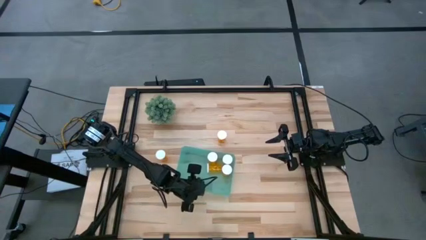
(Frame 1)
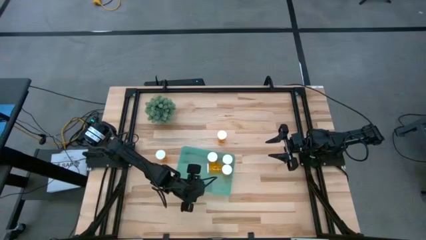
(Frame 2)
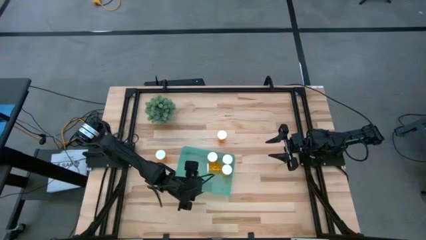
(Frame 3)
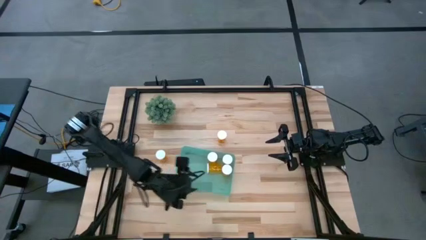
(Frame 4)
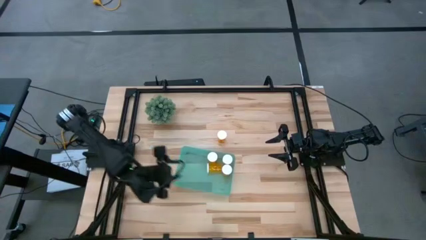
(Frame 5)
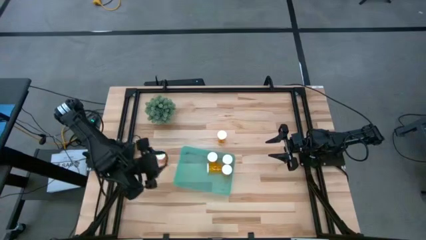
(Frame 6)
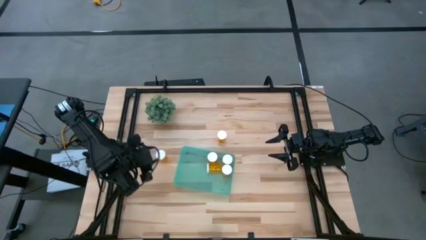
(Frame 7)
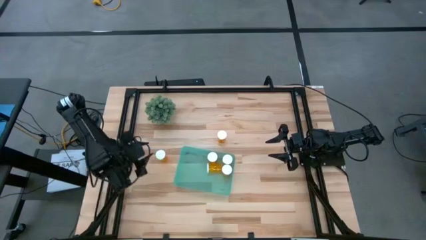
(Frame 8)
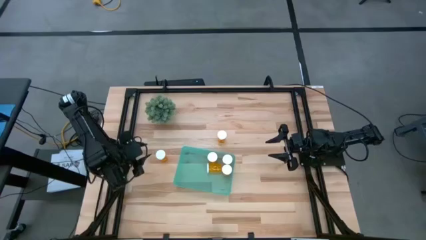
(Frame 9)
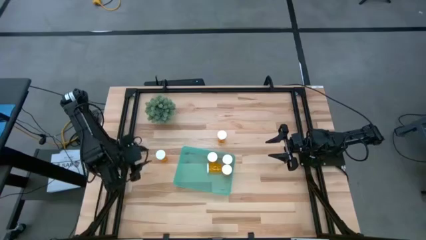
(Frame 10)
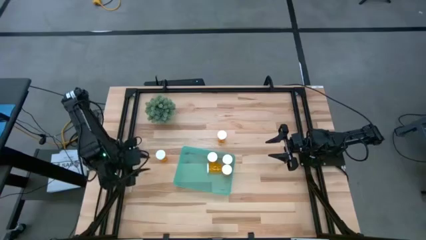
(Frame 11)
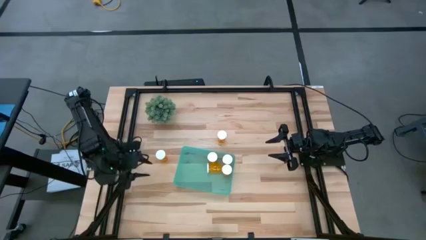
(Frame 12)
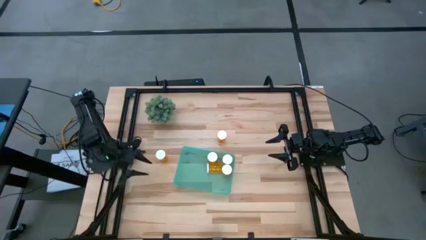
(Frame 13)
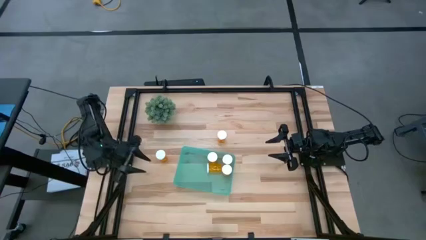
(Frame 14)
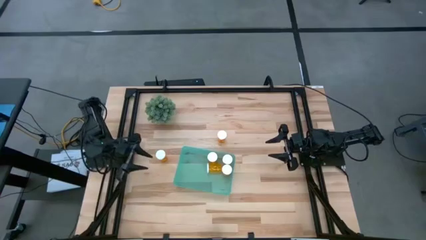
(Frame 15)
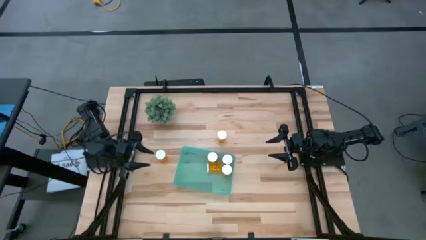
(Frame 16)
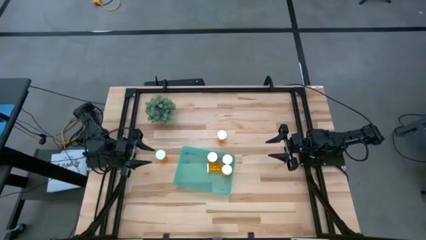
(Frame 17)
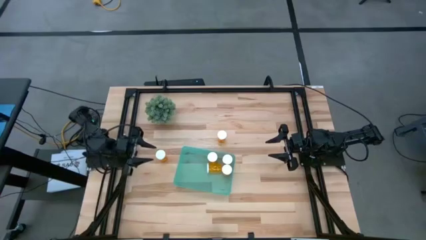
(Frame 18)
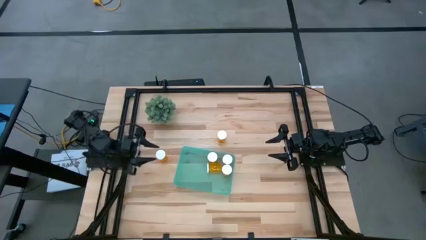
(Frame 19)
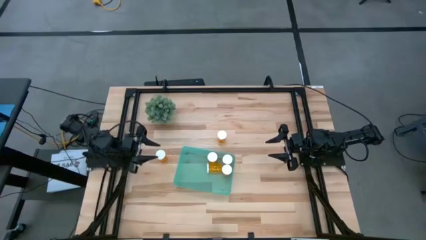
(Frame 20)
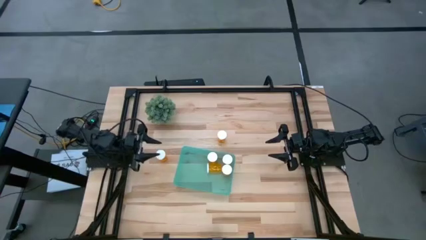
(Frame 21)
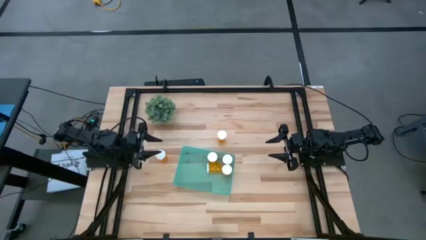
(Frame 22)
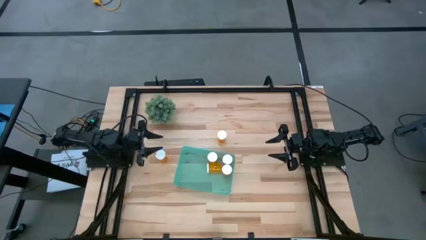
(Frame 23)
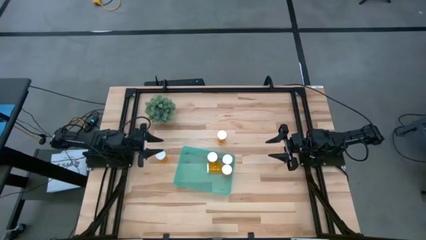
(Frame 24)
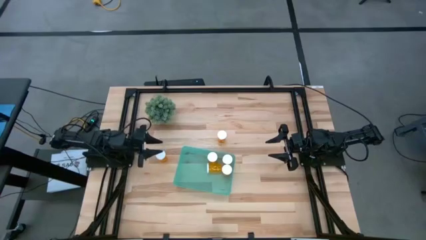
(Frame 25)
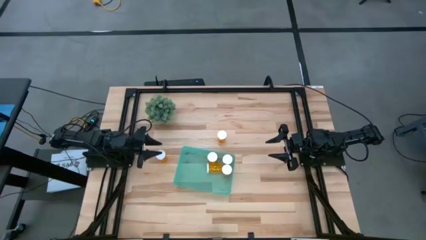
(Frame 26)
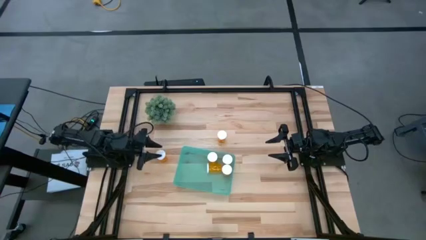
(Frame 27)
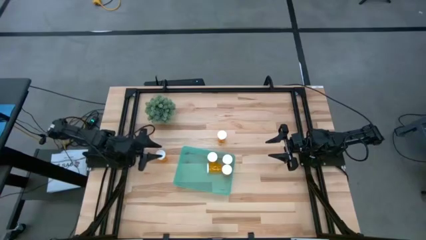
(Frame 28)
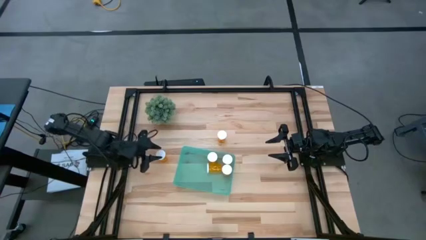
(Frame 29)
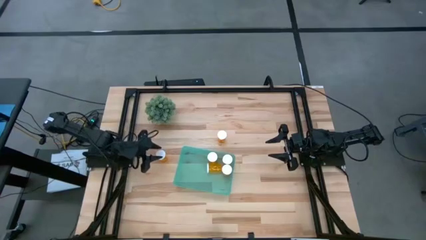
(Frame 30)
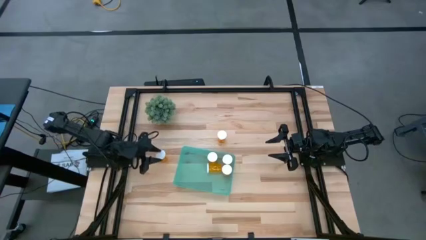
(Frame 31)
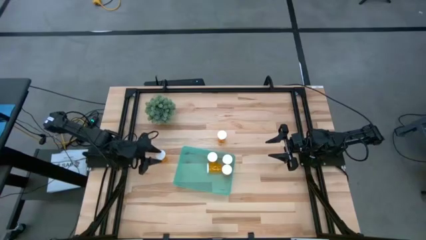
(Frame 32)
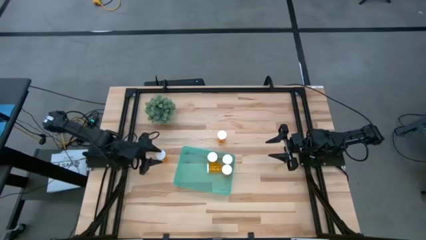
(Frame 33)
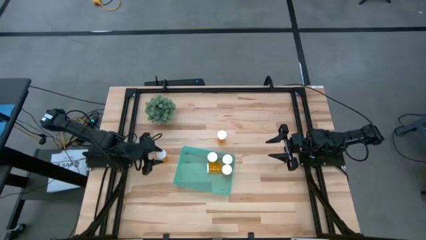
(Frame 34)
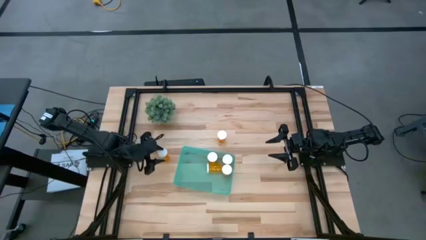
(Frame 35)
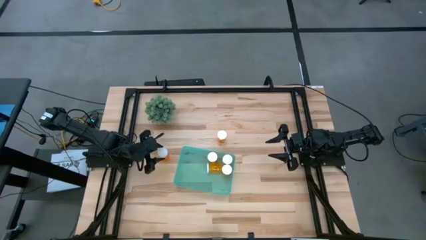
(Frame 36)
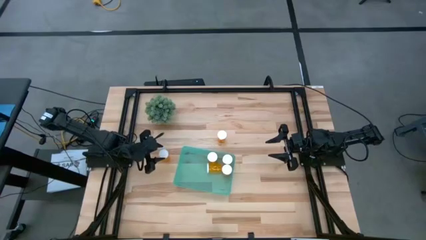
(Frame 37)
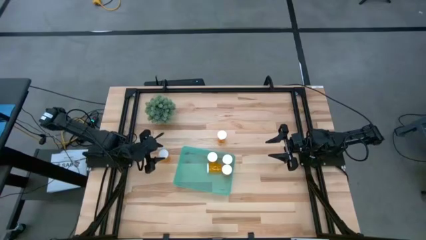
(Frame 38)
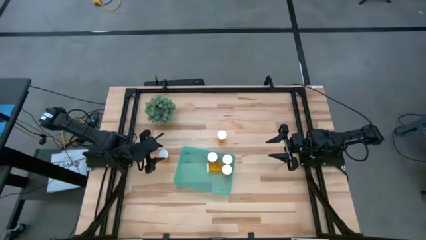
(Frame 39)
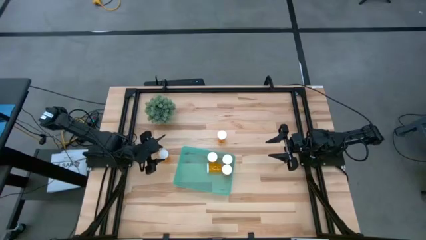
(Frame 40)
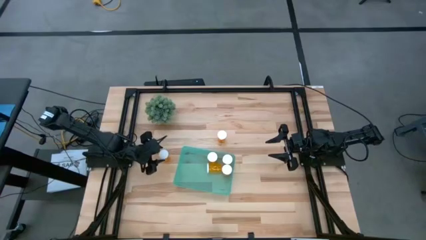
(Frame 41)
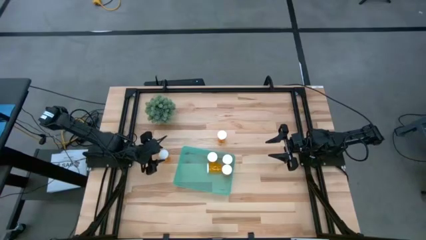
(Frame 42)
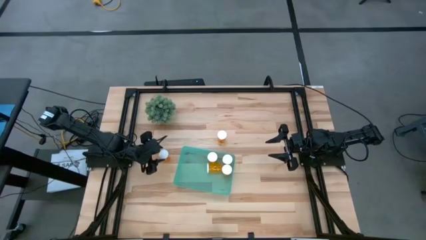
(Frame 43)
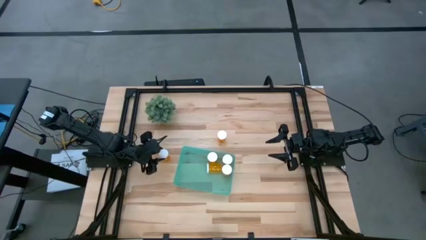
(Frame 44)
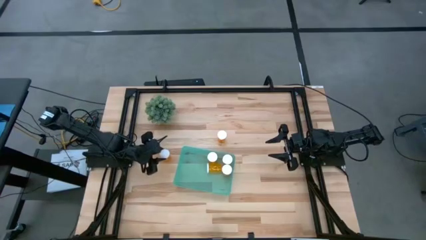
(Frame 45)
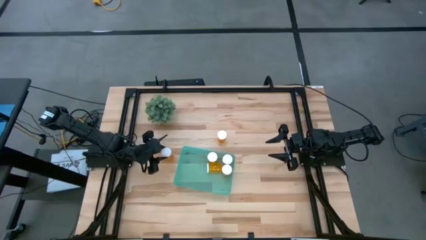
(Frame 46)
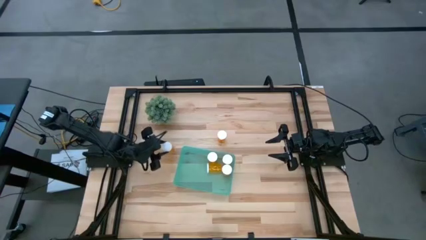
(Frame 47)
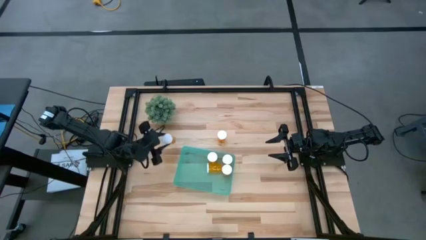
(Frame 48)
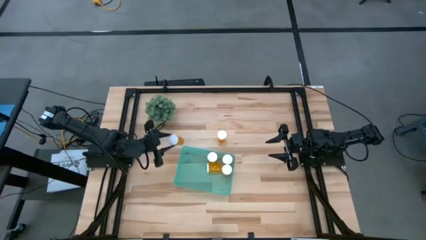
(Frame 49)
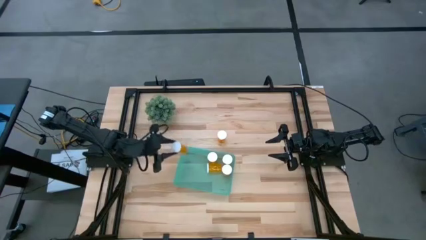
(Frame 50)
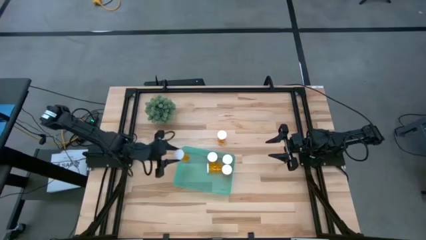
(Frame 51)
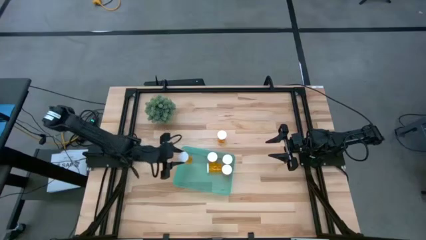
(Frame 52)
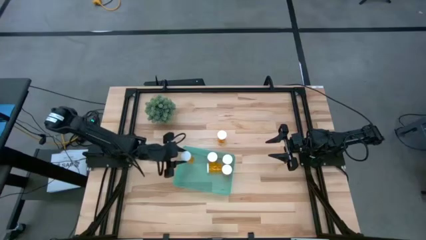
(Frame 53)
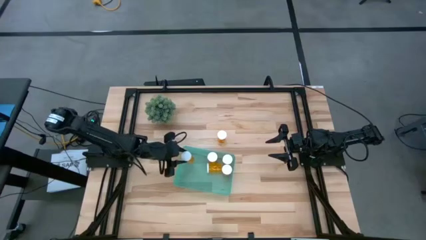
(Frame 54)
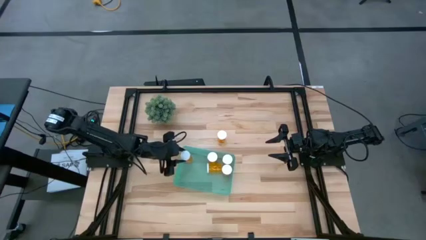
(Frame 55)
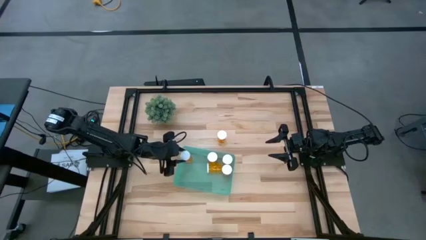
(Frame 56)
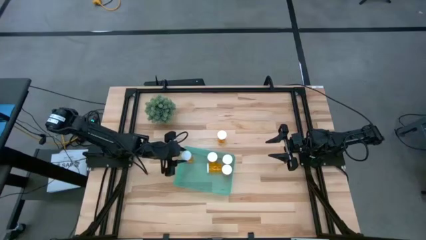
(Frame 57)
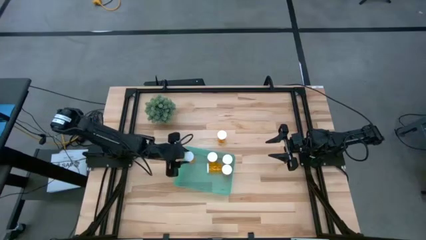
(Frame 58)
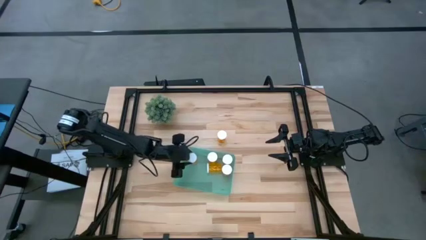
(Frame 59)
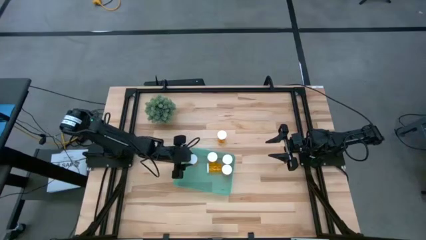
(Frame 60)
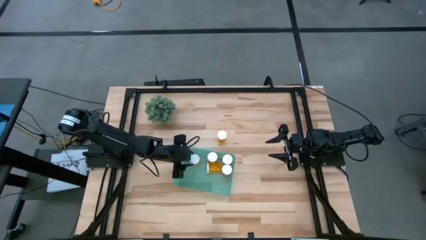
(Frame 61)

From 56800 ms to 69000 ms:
Task: Pick and place pill bottles into a basket
Put the left yellow pill bottle into the green bin
